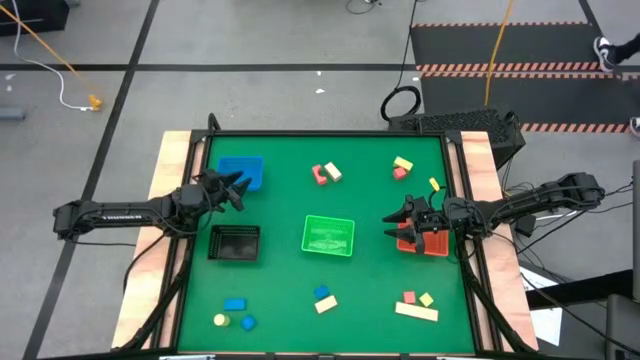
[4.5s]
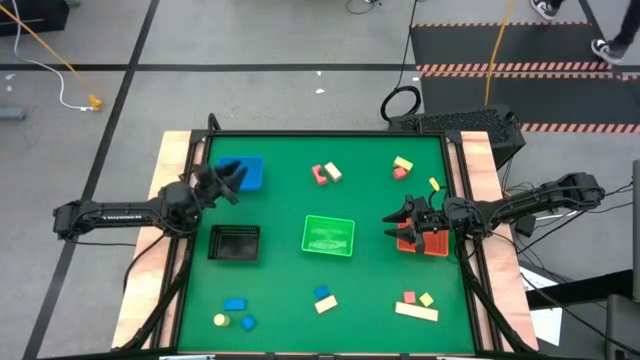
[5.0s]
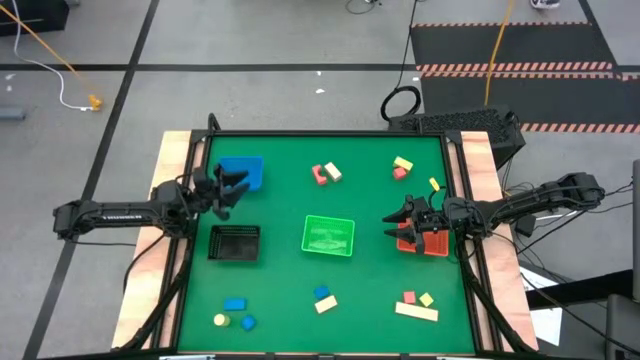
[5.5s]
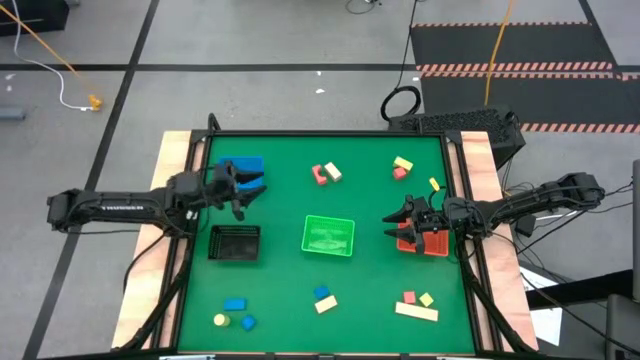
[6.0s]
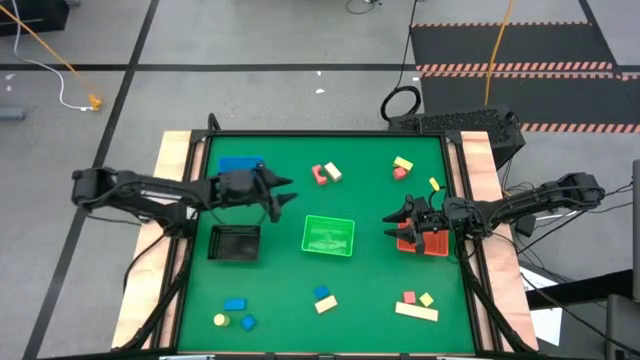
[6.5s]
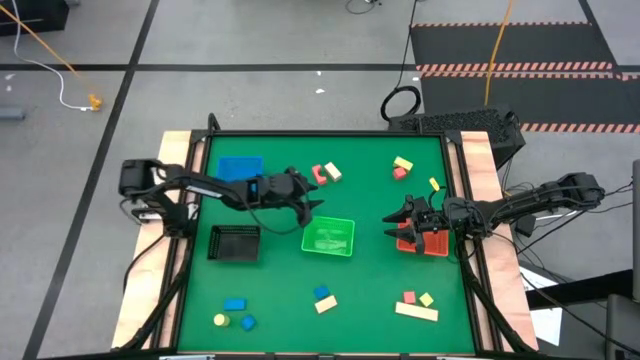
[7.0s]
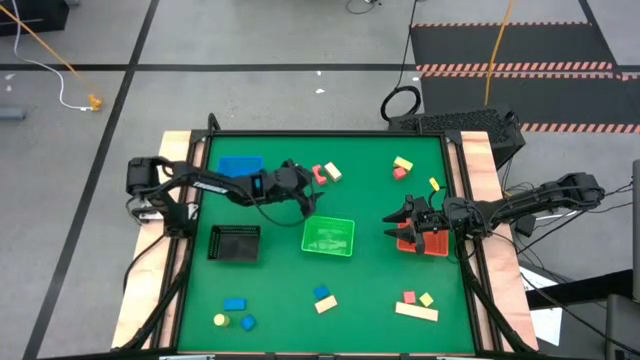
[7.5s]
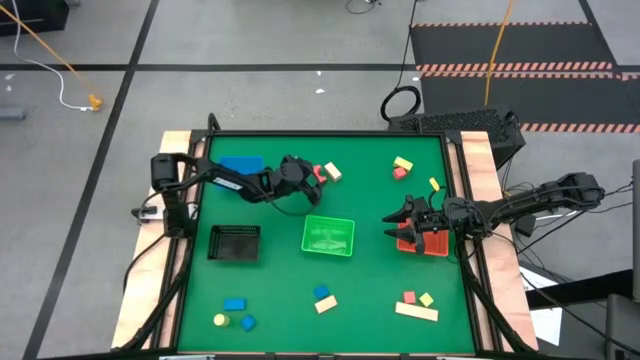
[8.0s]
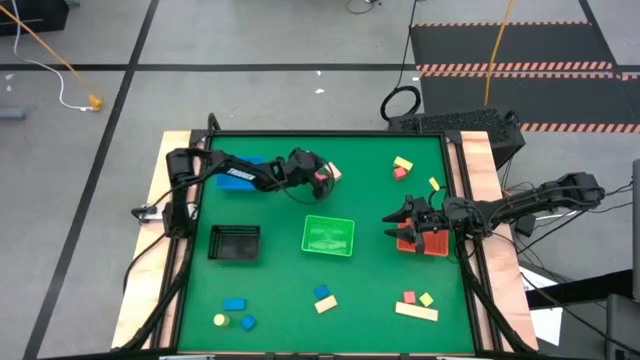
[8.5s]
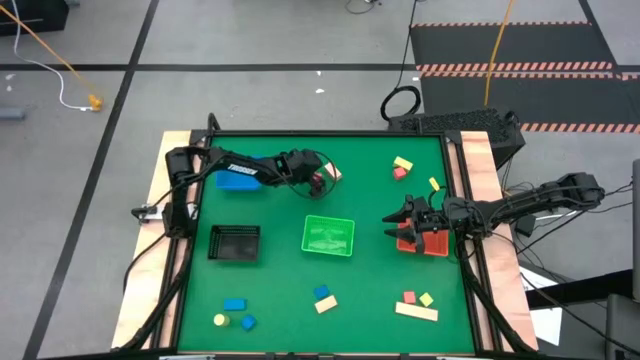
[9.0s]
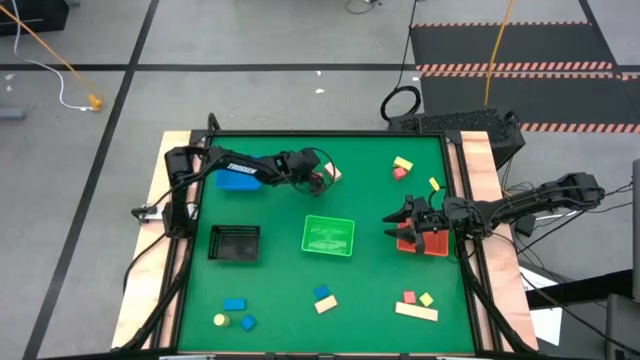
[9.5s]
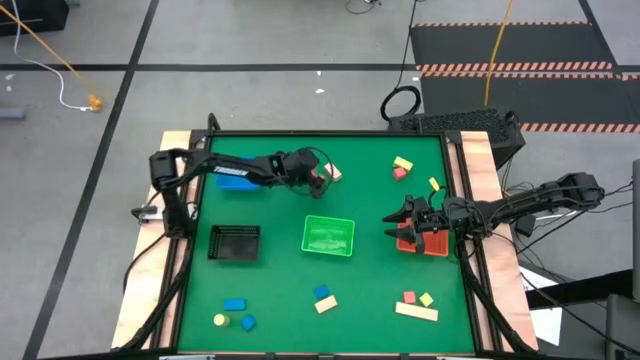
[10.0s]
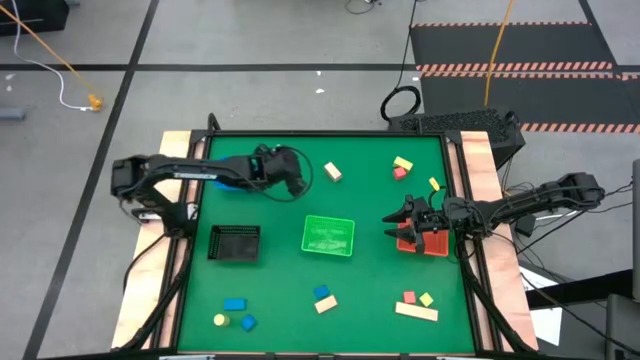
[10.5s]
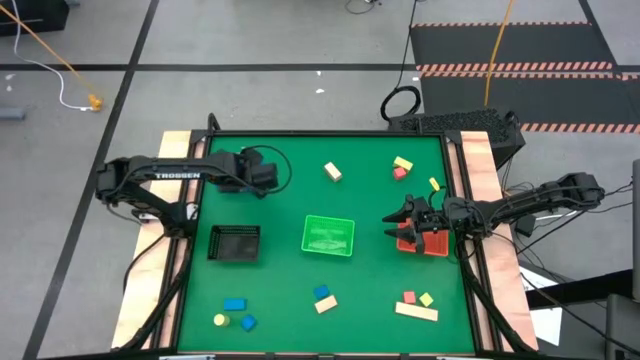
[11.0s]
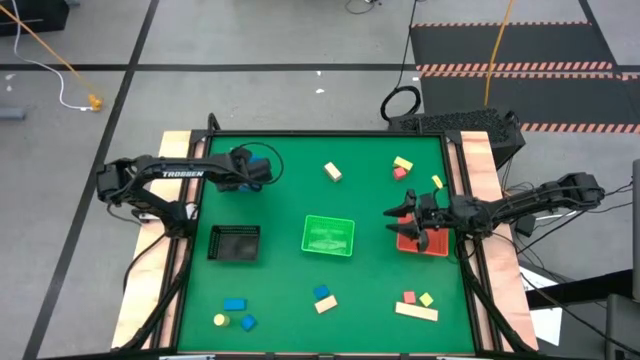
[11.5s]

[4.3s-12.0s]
Task: Sort & place blocks by color
Put the top left orange block into the blue basket

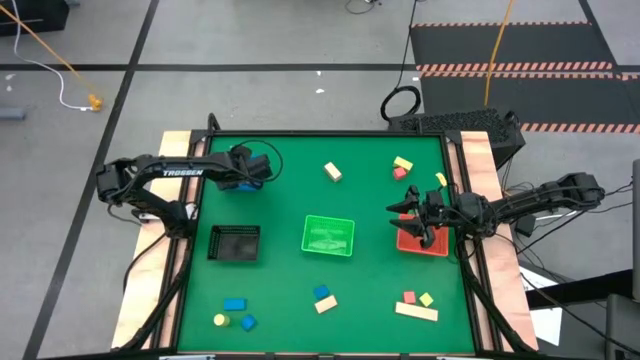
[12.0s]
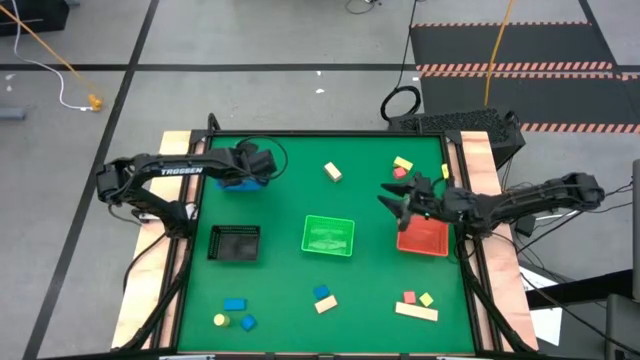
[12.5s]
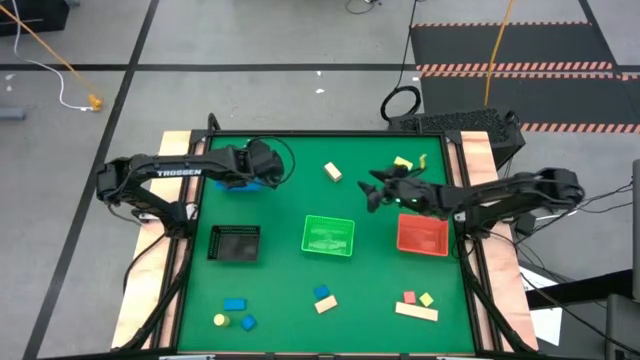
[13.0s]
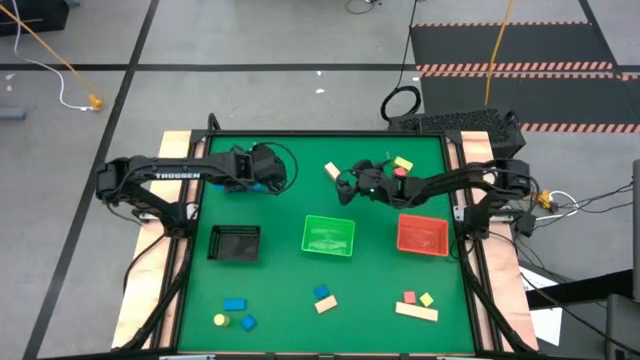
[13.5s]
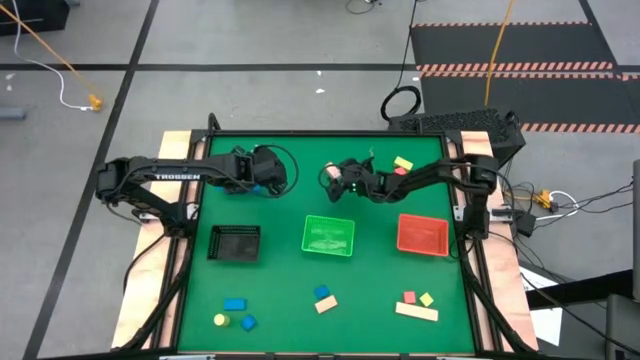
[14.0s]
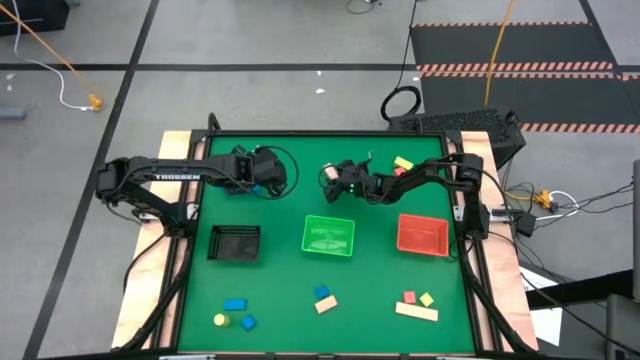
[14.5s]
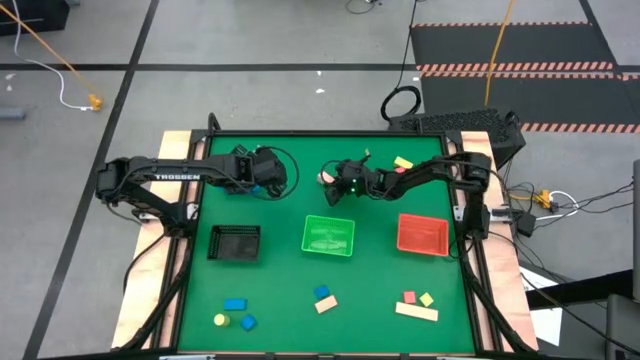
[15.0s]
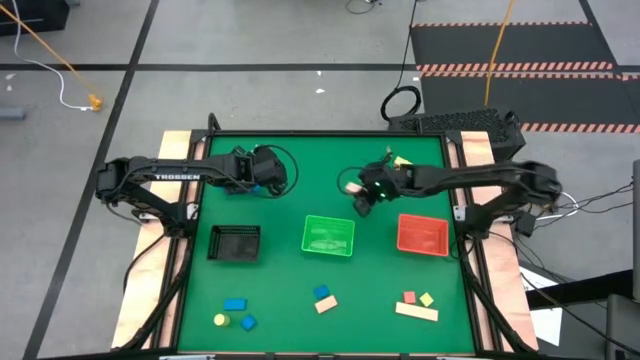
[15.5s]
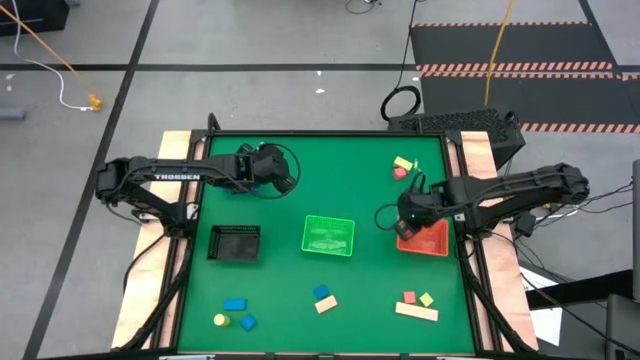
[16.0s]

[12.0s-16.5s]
Put the top brown block into the orange basket

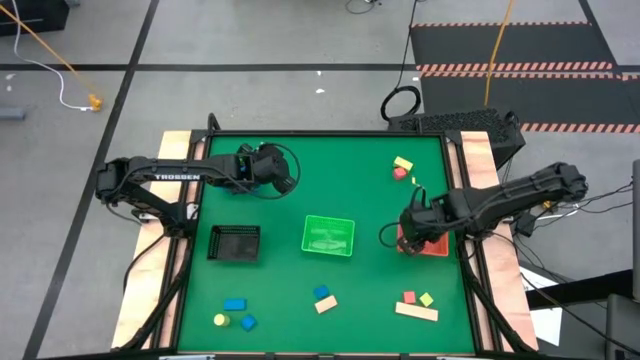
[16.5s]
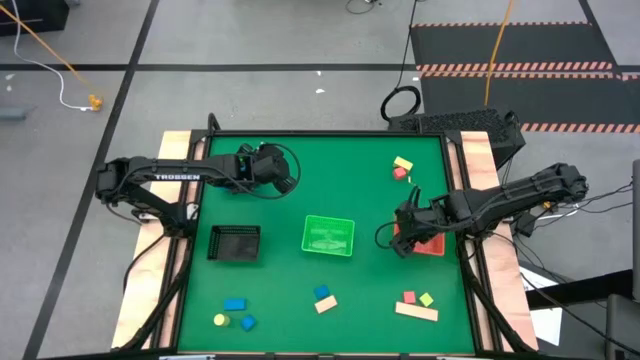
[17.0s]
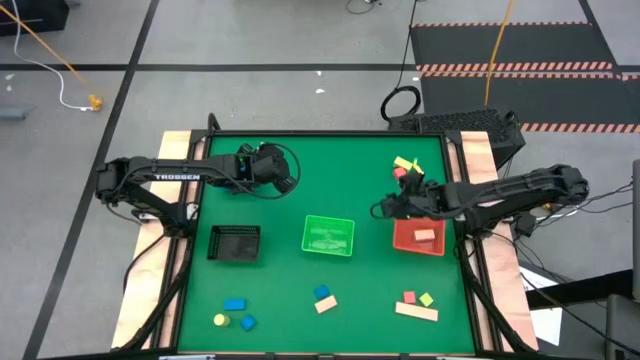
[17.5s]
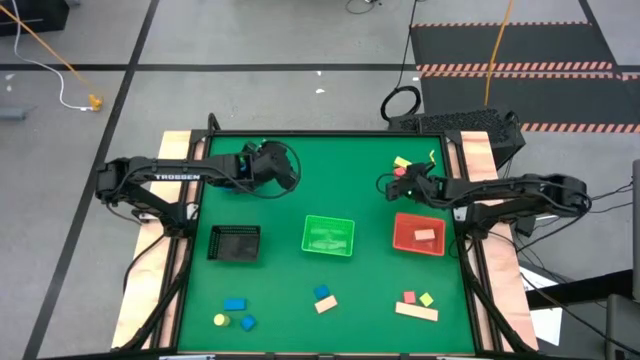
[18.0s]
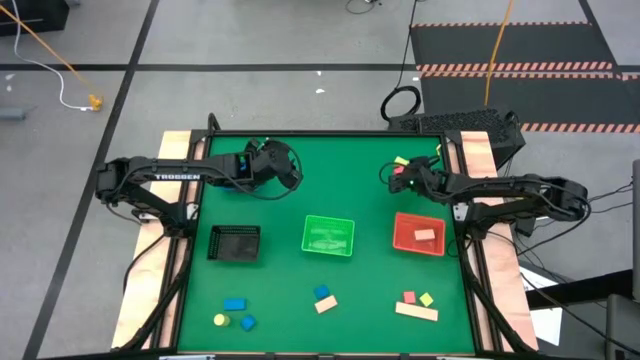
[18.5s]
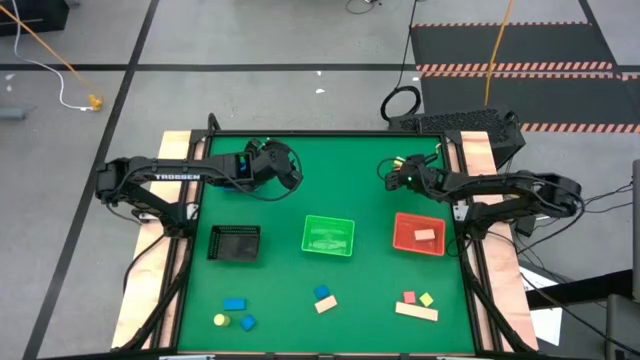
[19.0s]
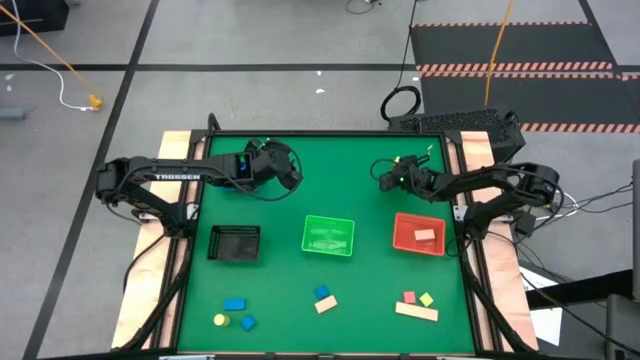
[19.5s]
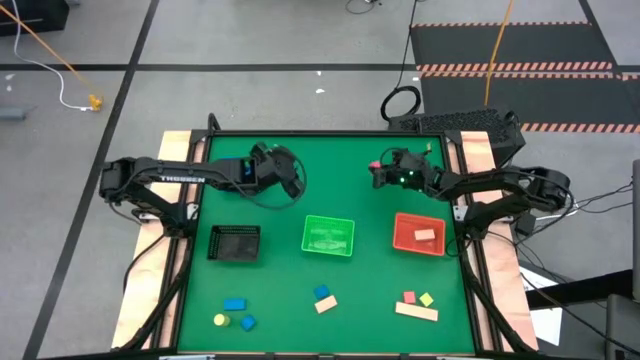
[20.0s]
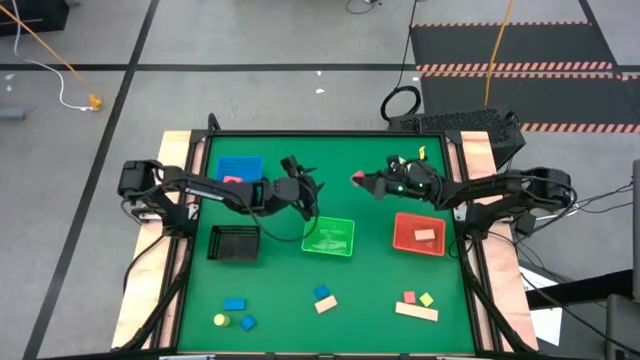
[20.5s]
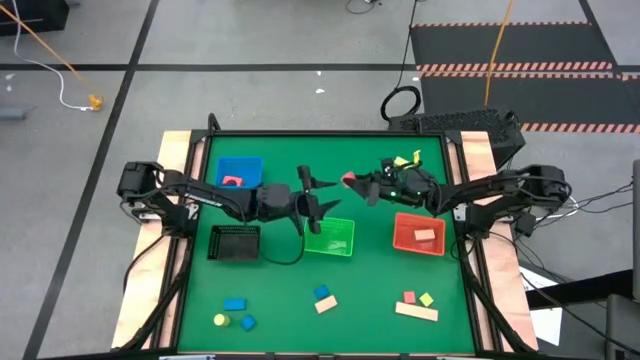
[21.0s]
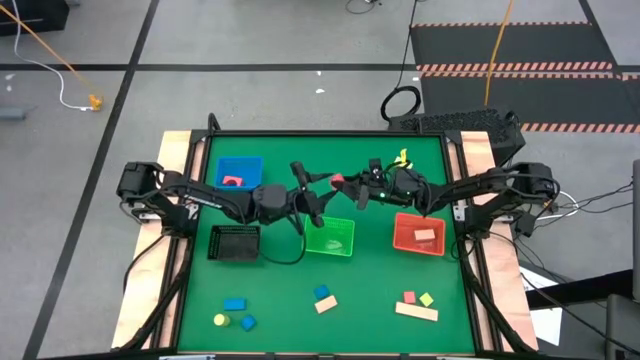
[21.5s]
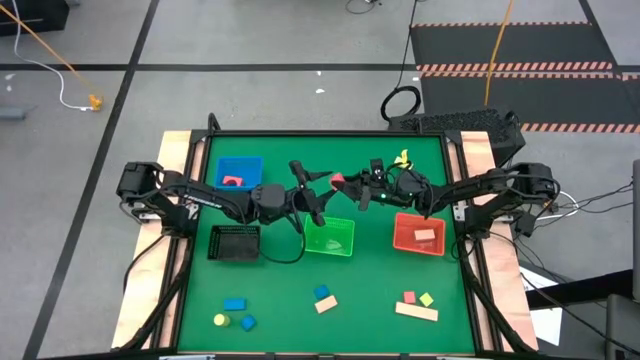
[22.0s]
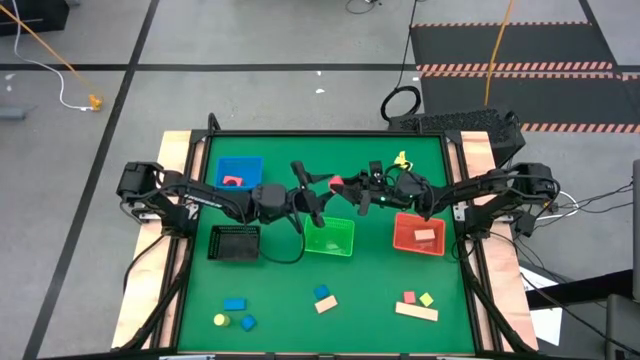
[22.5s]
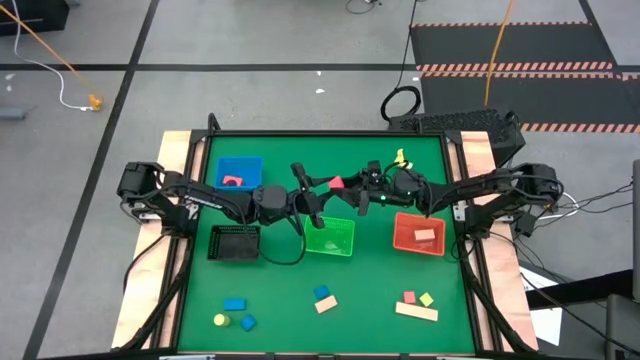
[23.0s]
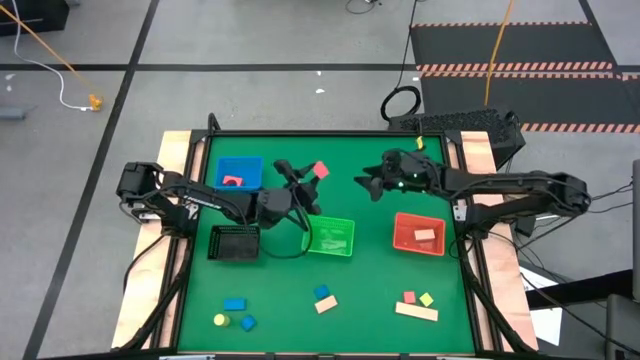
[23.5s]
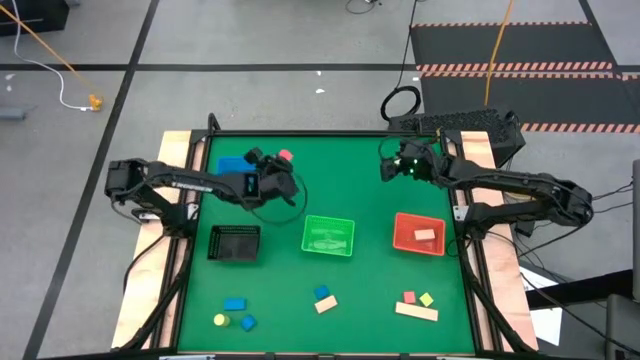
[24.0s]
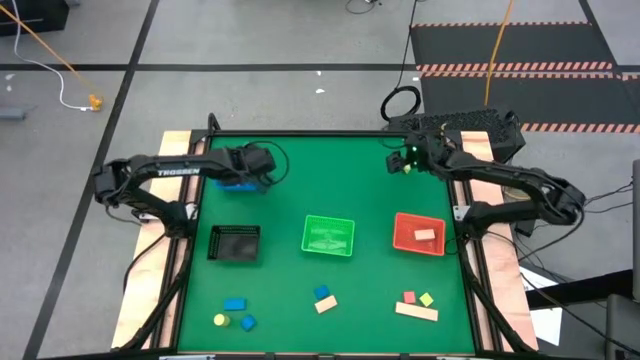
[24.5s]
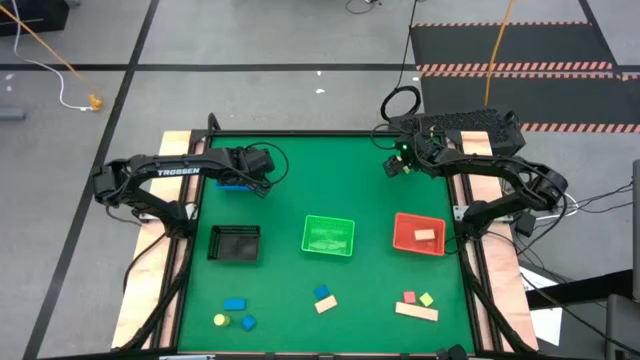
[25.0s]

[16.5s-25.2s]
Put the top orange block into the blue basket

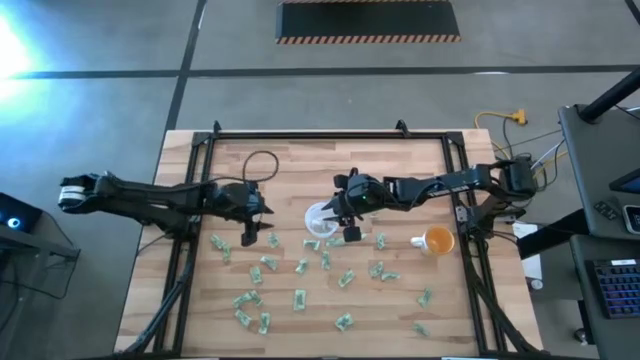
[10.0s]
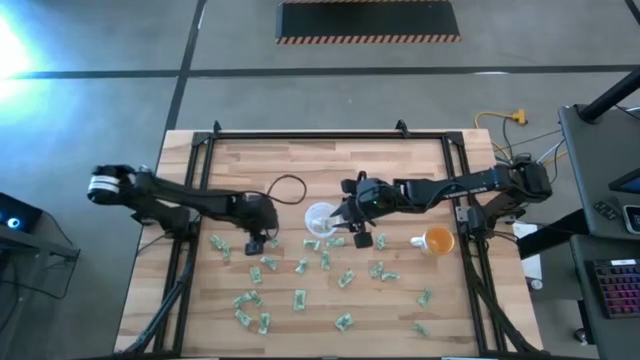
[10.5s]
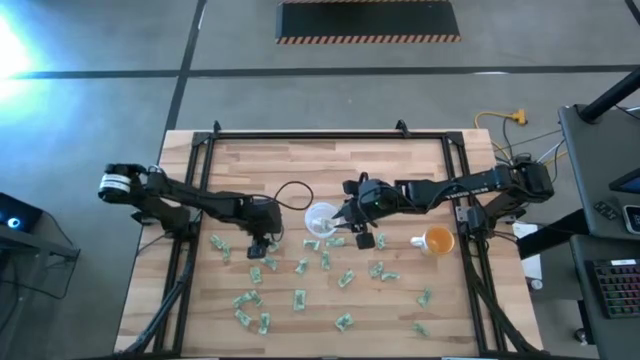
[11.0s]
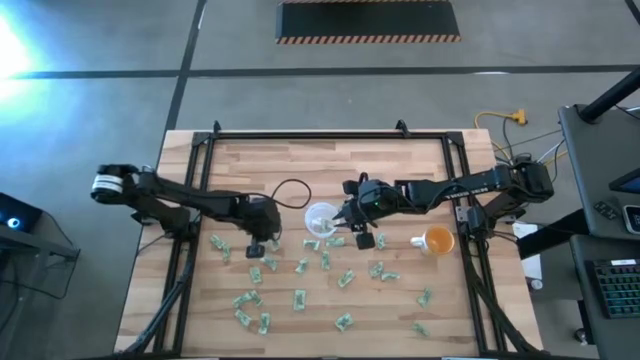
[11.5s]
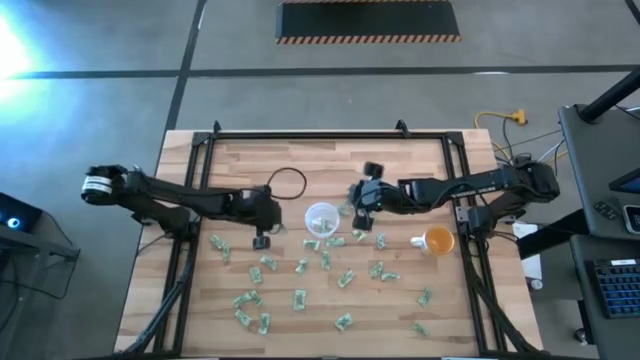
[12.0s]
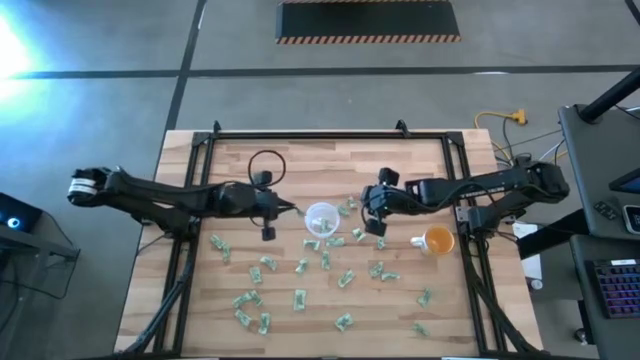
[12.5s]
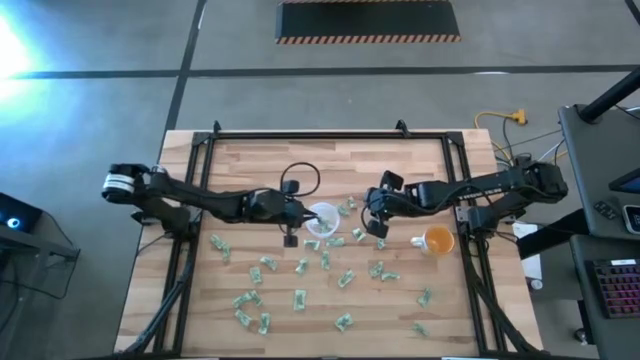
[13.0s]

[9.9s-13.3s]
Task: Pick and place Stevia / Truvia into bins
Put the light green stevia packet into the transparent container
